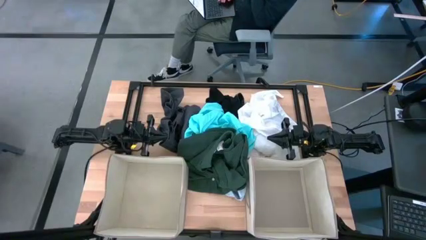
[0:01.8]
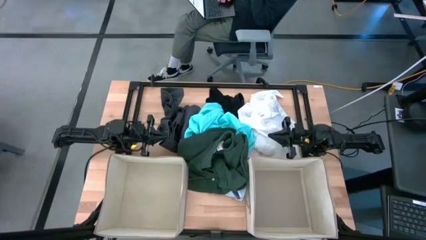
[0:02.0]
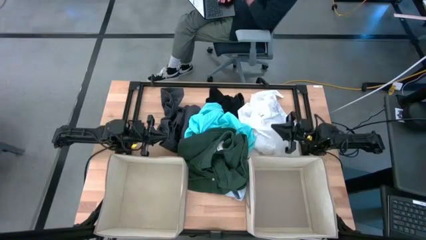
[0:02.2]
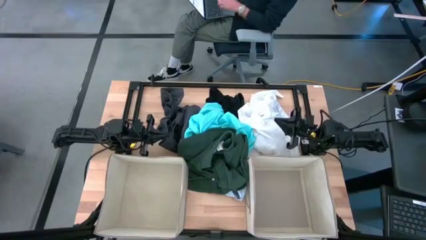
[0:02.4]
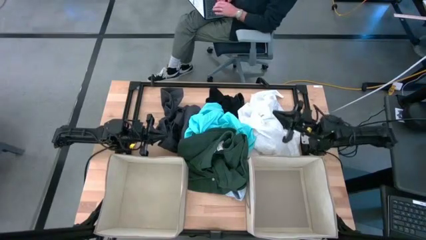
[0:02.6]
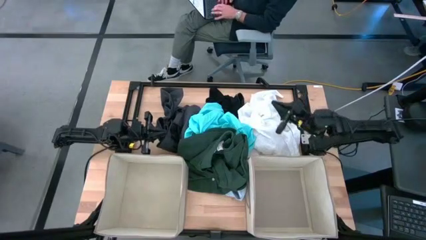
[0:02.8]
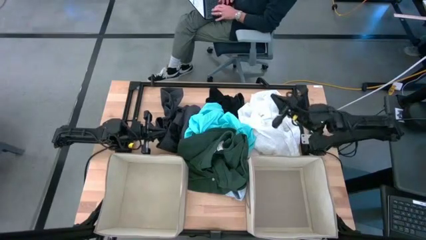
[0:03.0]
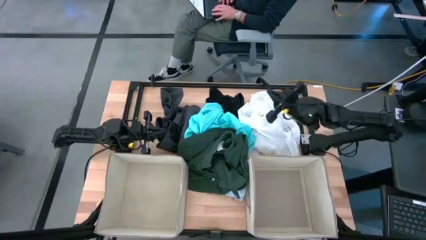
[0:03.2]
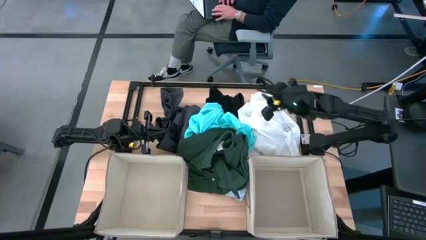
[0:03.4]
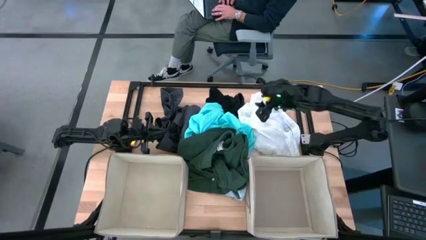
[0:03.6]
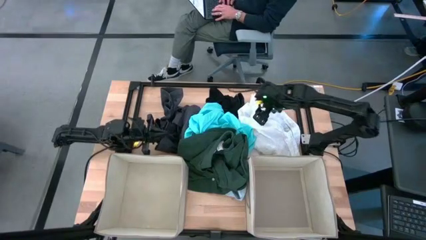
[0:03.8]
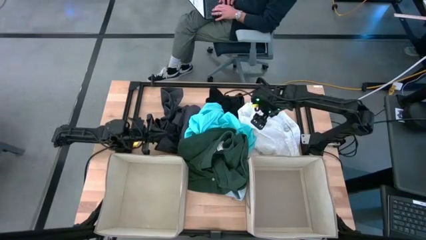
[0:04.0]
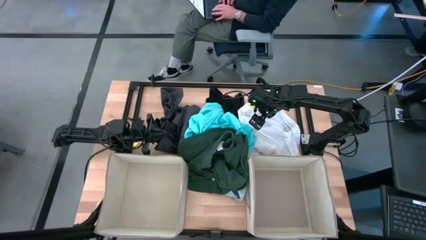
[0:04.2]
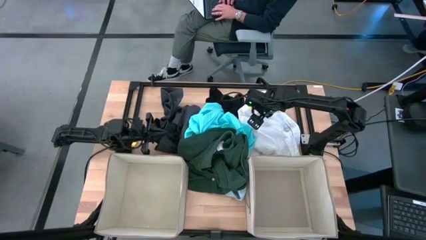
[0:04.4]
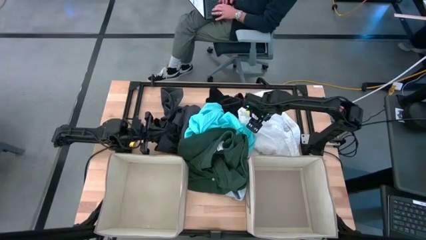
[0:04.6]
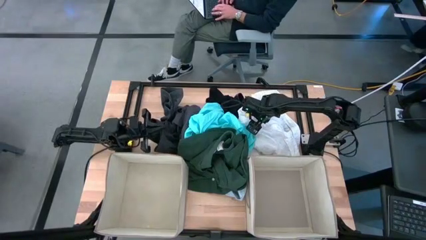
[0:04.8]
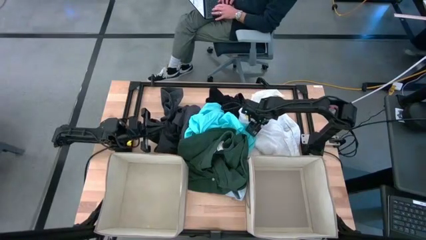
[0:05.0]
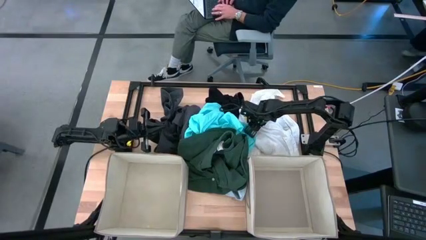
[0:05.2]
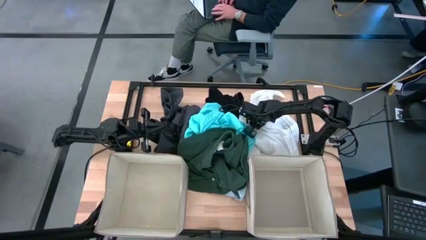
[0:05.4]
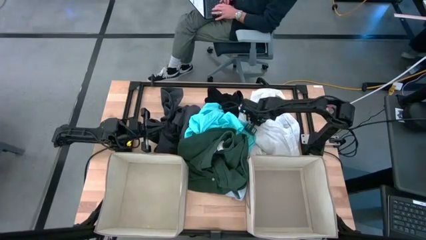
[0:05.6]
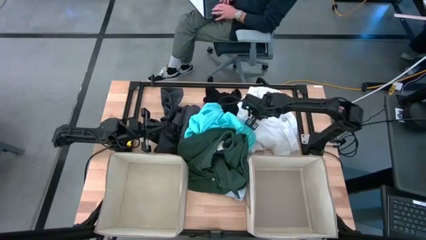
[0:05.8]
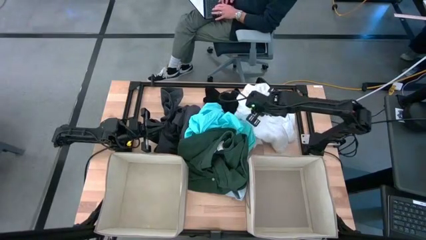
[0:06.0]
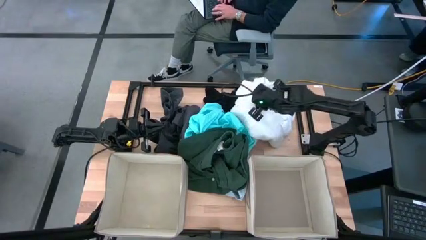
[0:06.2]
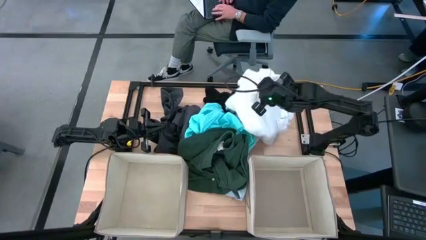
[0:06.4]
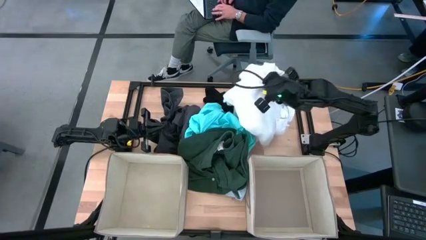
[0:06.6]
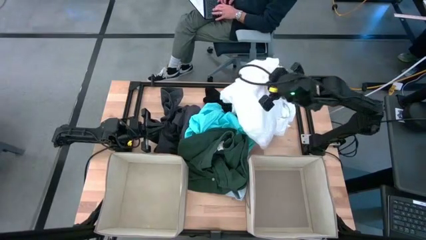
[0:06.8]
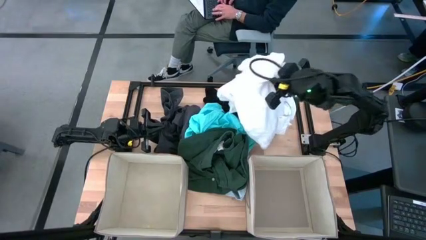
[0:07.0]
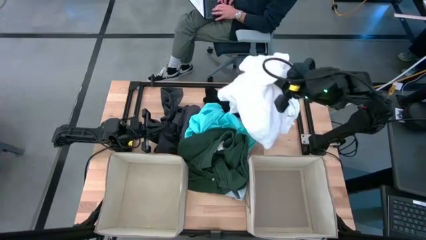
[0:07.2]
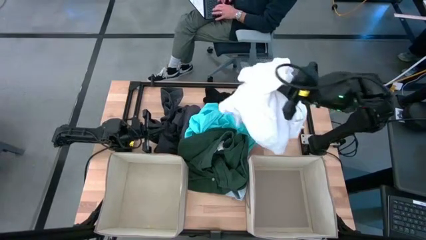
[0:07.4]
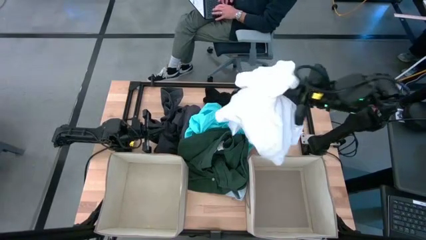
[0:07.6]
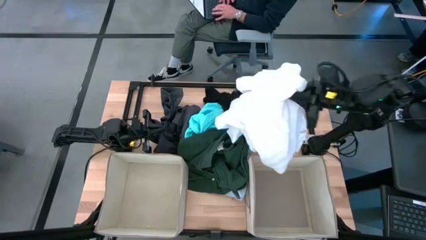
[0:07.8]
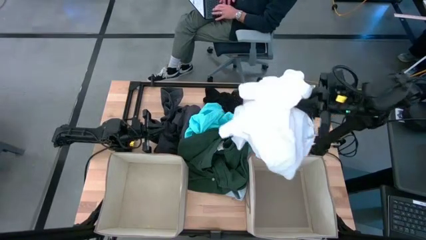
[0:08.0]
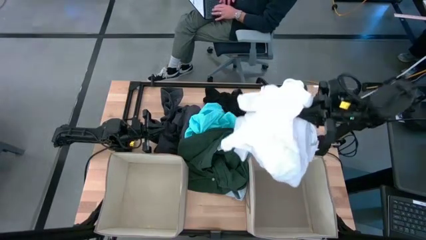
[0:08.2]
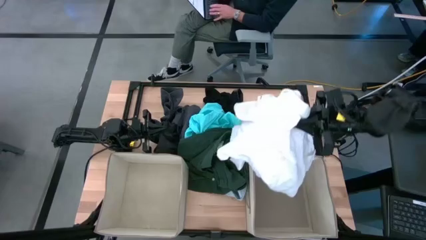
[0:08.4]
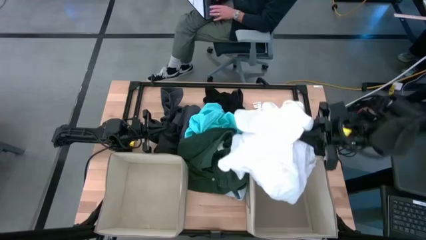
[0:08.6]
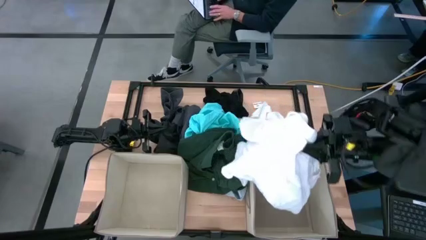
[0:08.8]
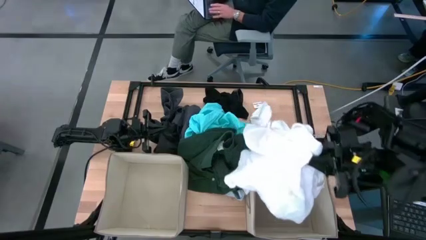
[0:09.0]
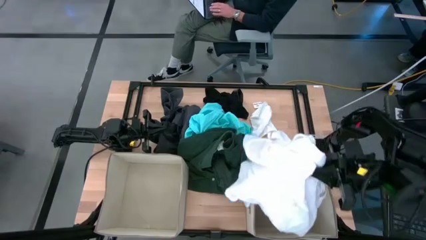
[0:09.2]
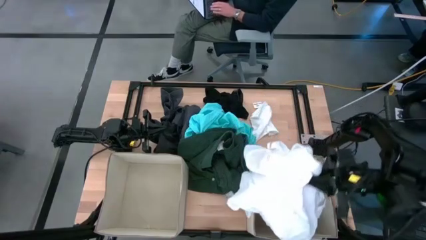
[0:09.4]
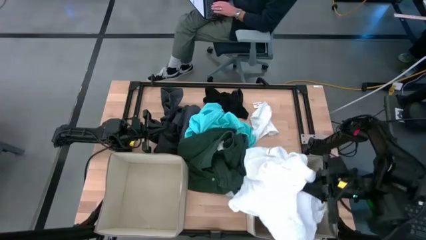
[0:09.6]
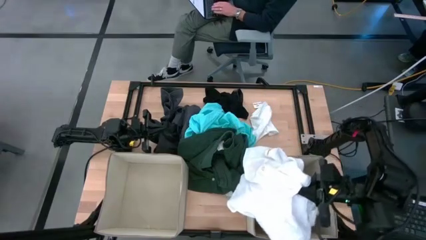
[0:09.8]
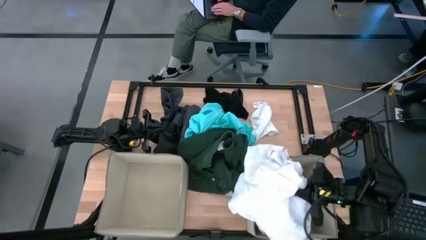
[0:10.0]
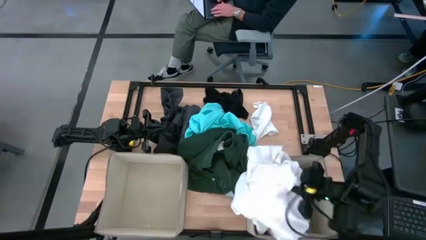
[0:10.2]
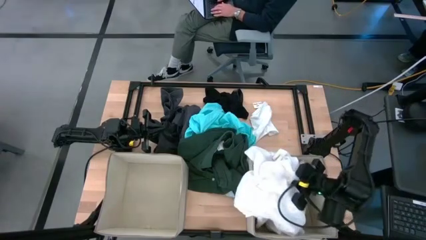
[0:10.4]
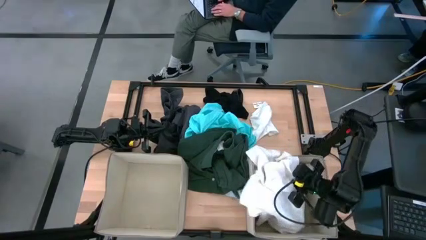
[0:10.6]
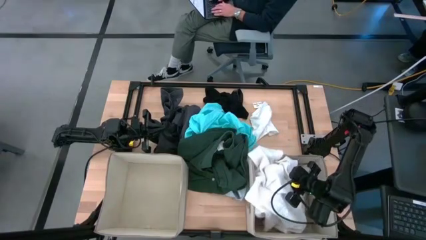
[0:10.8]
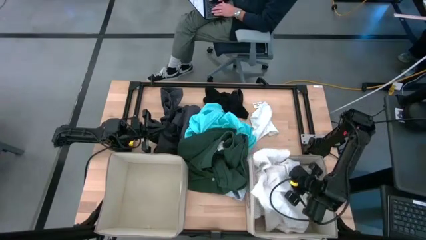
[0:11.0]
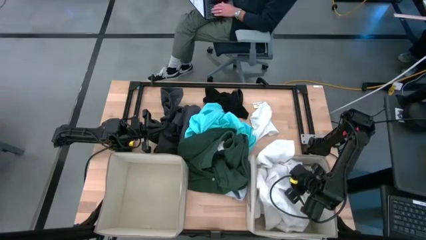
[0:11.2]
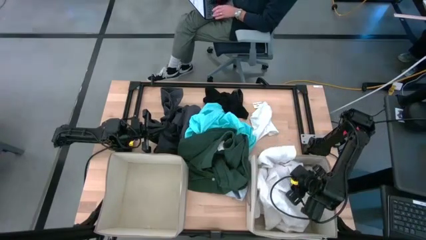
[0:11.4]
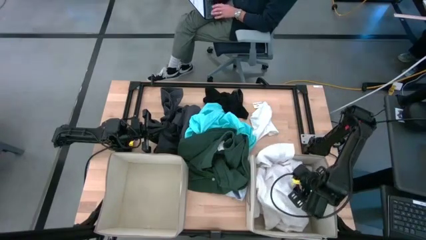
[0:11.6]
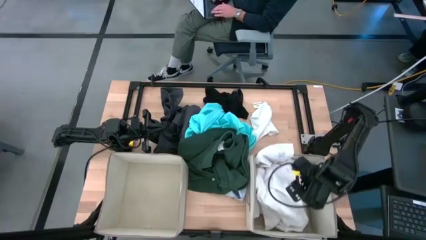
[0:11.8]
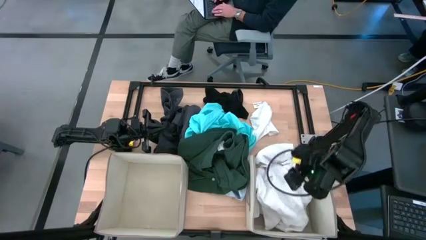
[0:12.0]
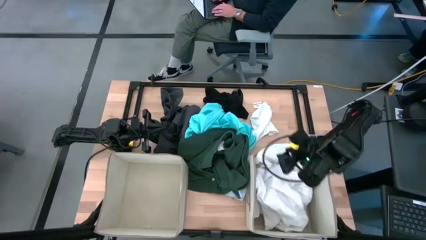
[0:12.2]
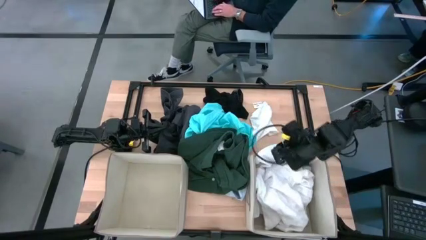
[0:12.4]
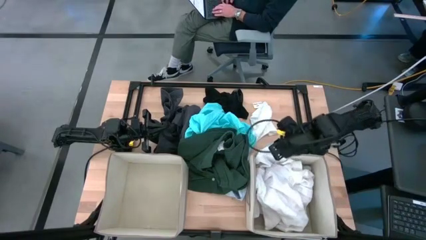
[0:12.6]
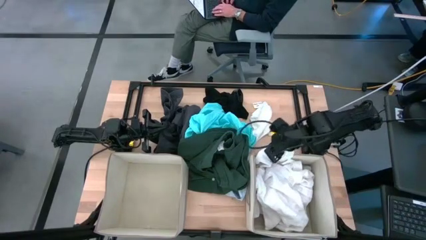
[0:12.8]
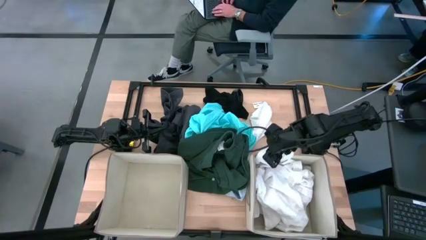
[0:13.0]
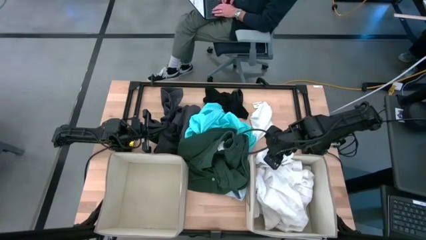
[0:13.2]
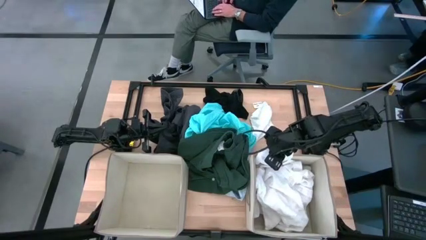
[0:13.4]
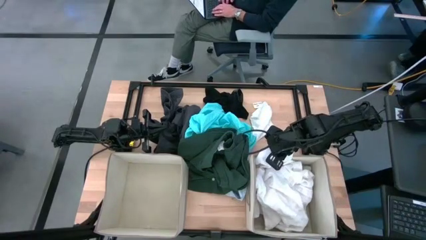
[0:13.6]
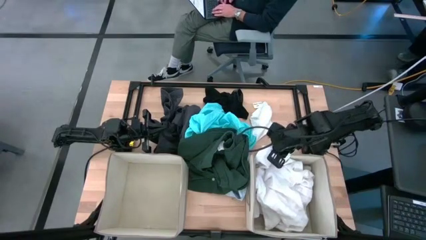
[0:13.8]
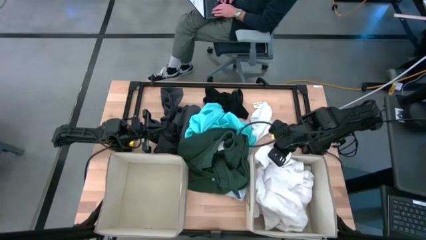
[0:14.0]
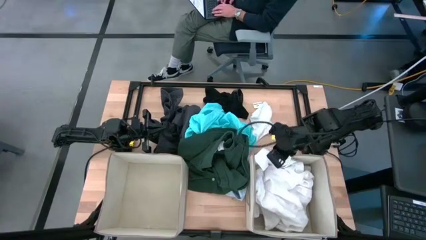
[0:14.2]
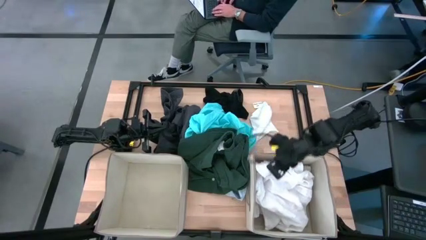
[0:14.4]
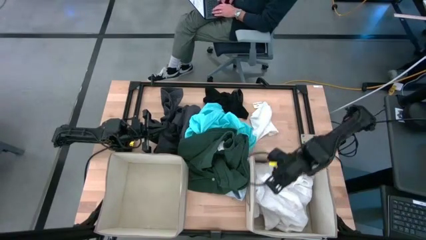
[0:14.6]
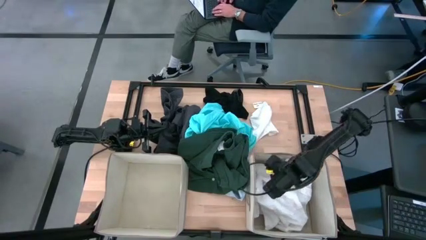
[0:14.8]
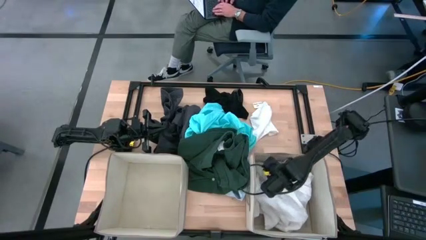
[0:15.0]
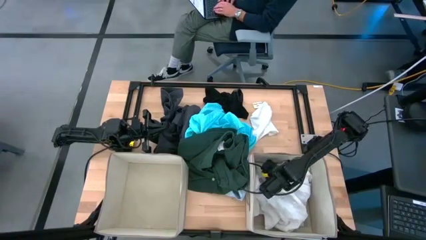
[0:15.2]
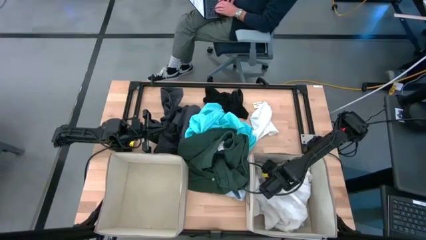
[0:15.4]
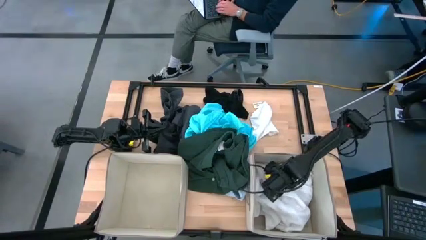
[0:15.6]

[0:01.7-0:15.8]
Task: Sort clothes
Put the white long sleeve into the right brown laundry organizer
